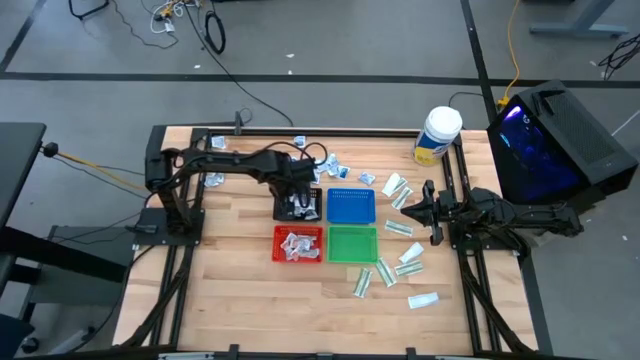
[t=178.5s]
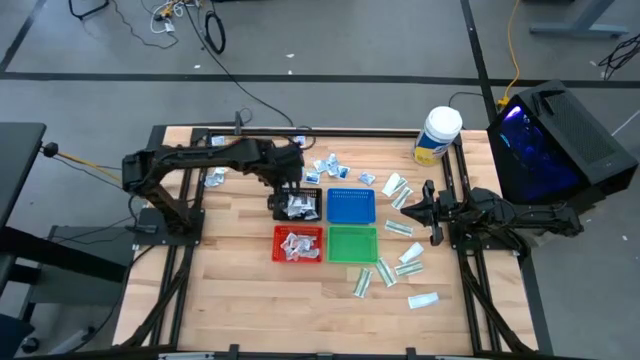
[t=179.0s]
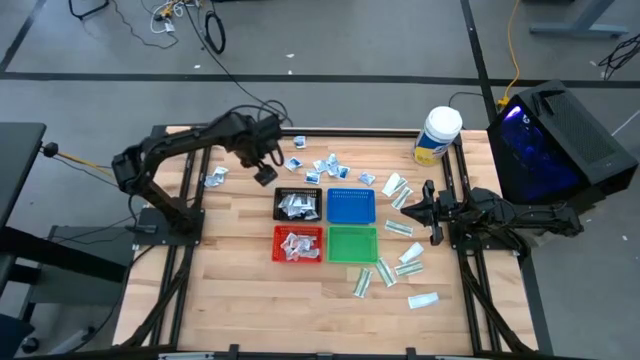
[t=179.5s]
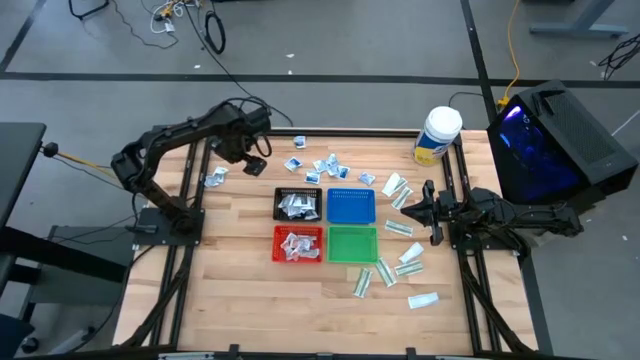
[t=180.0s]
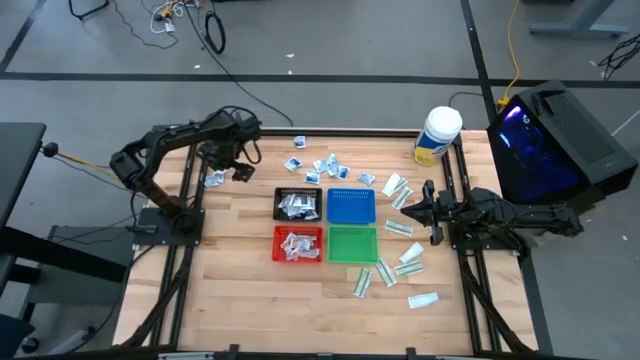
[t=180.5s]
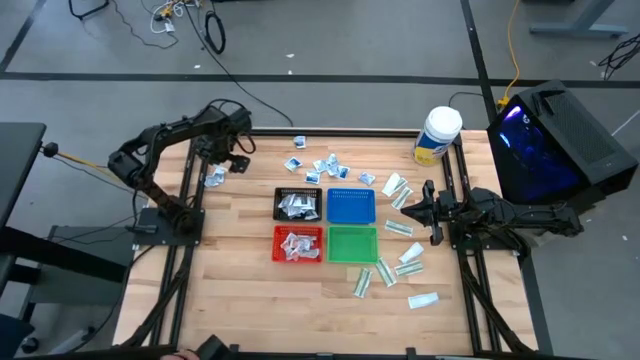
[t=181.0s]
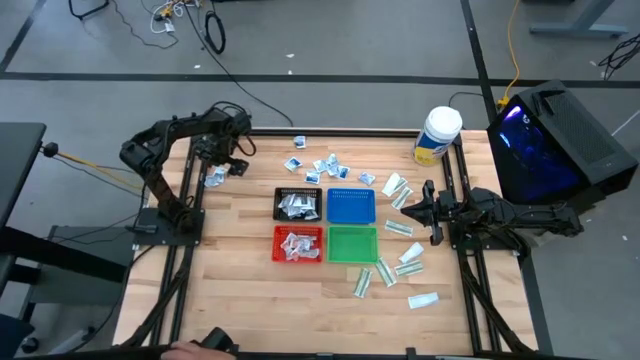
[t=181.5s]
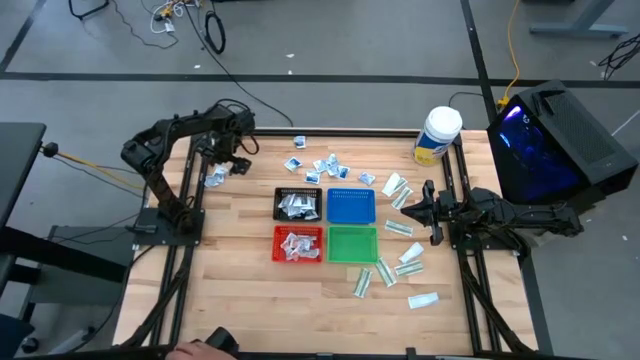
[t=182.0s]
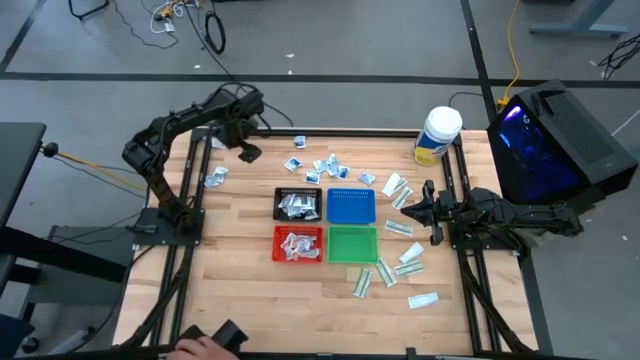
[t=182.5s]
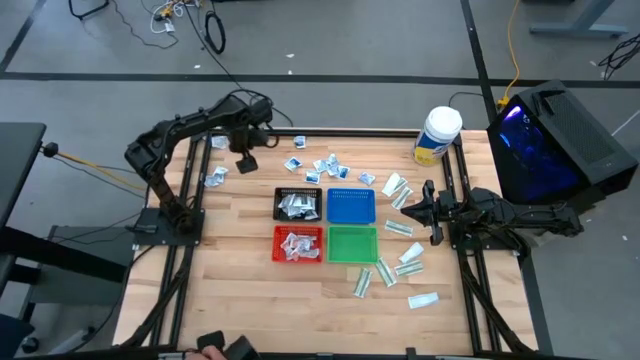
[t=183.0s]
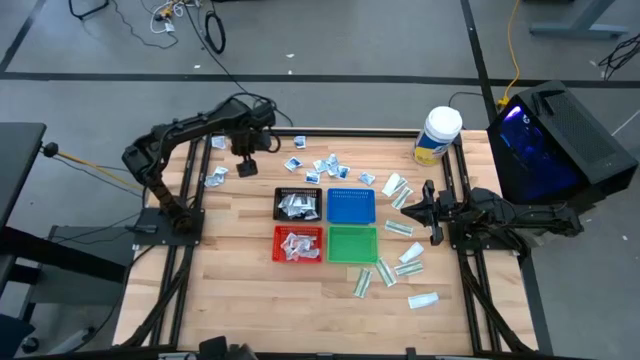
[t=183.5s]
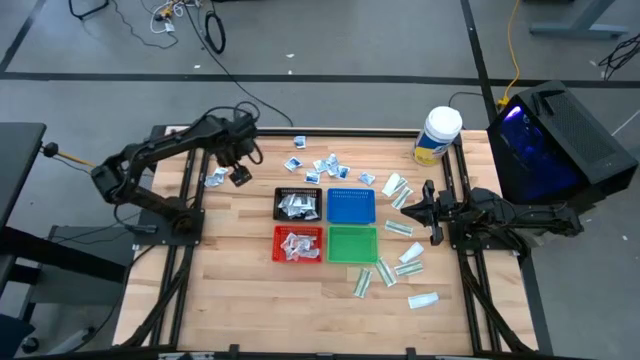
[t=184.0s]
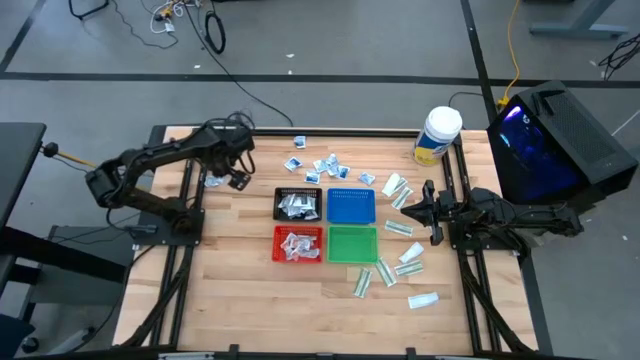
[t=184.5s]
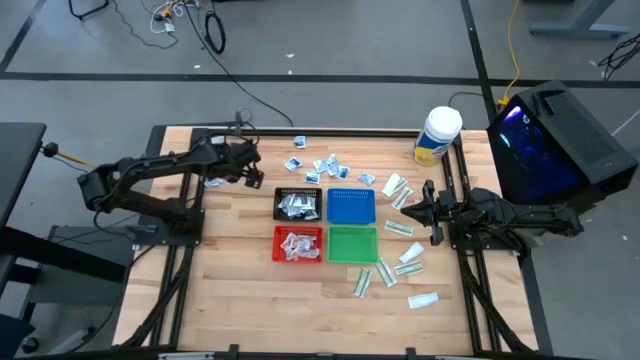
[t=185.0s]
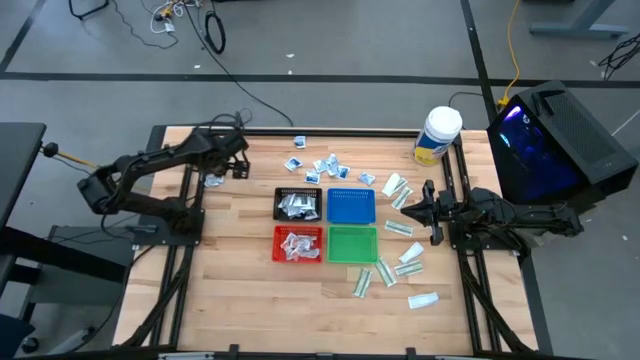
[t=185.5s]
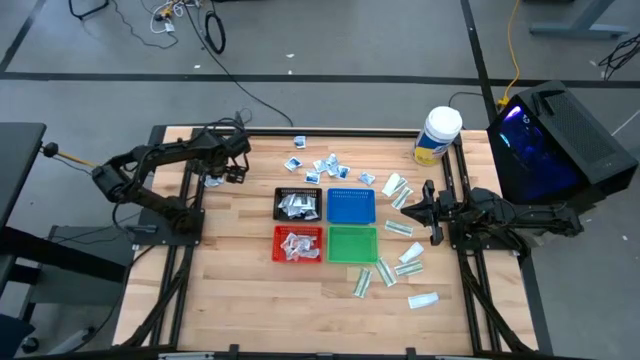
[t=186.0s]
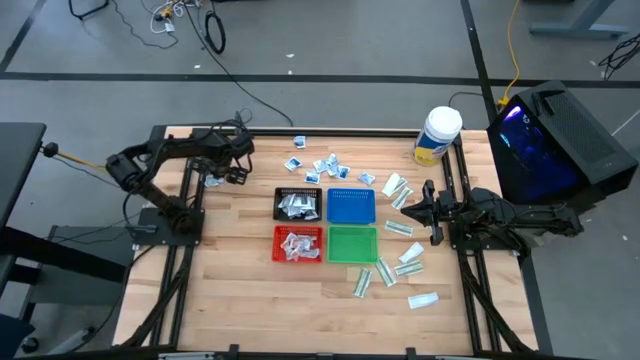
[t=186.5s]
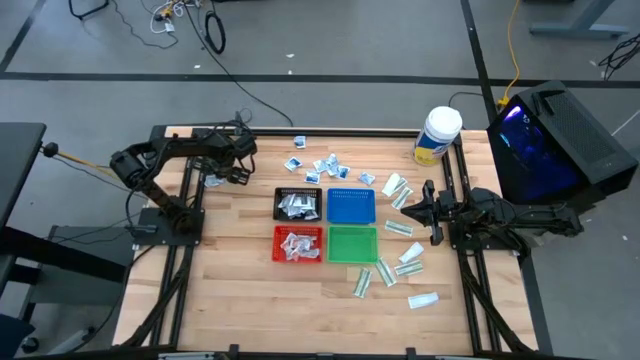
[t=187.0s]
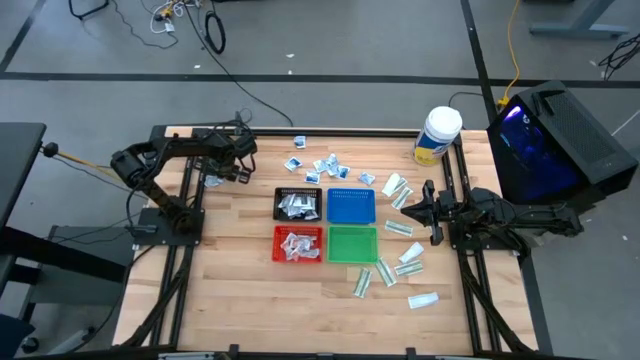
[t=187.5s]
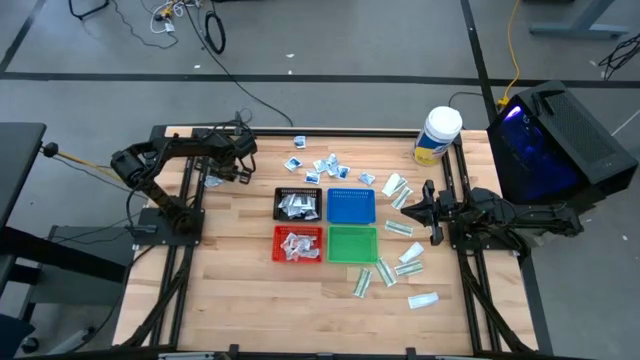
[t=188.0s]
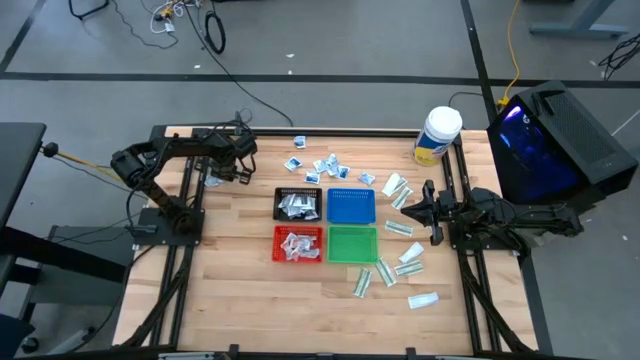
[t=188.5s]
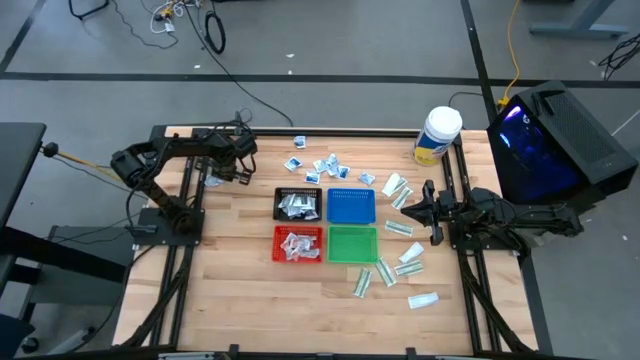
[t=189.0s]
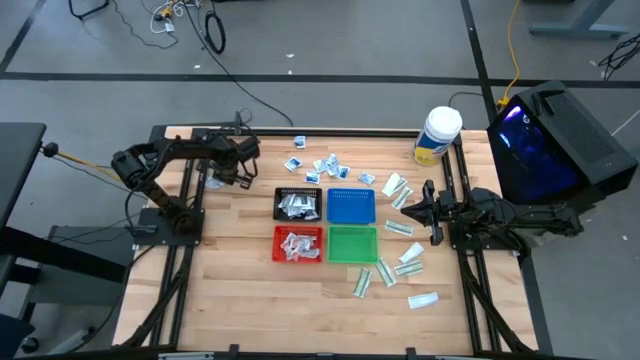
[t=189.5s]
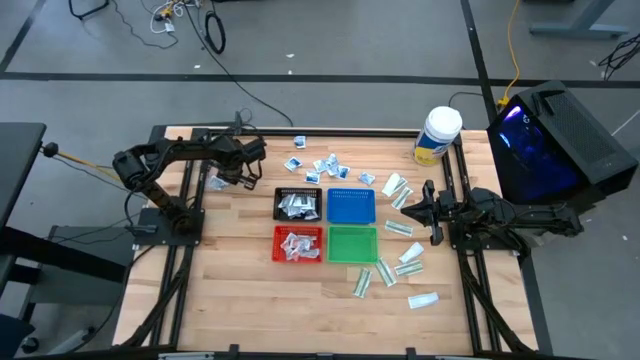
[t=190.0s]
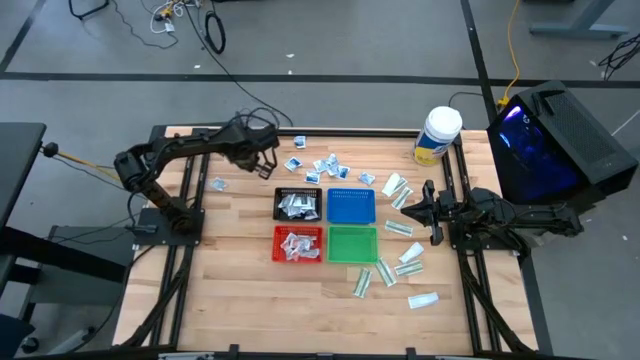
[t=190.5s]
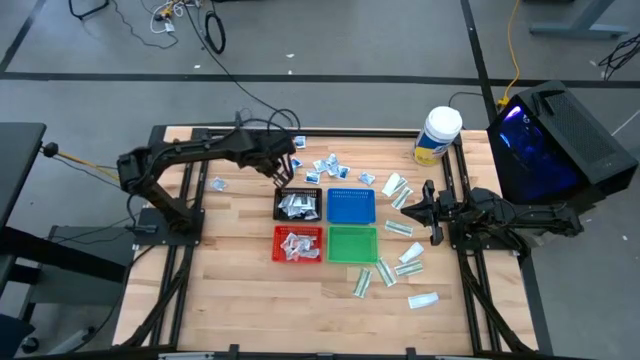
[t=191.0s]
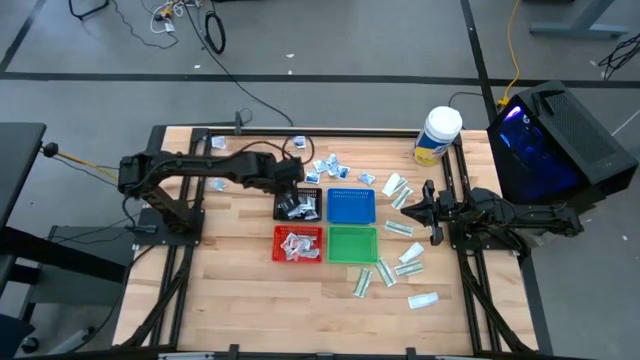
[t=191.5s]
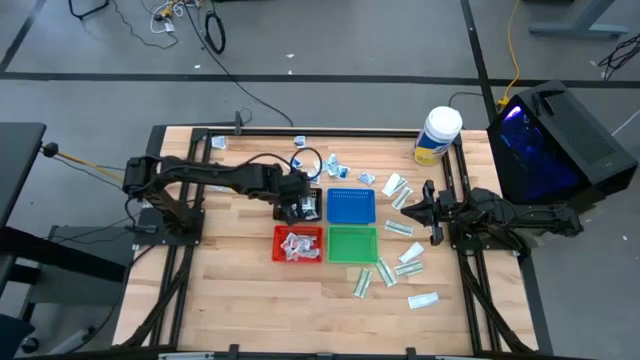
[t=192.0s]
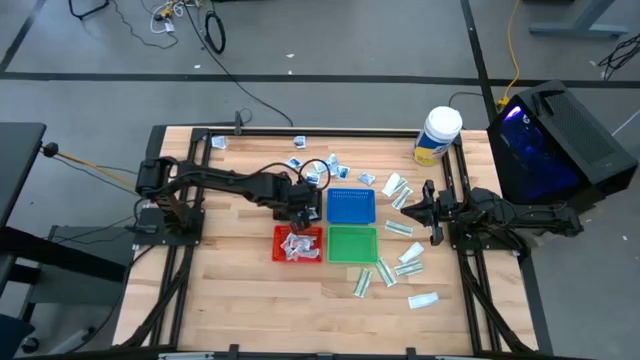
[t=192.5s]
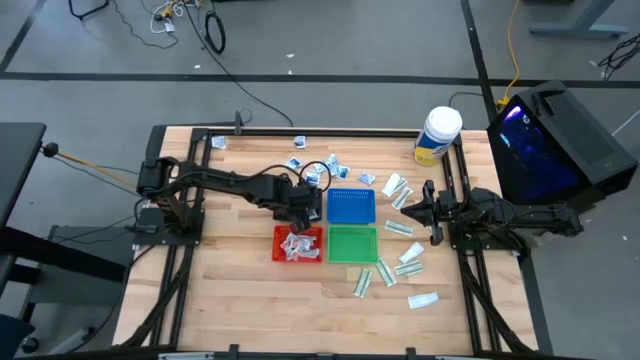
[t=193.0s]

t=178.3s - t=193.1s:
Task: Pick & Place First Aid Supplies
Put the gray towelette pack into the black bin

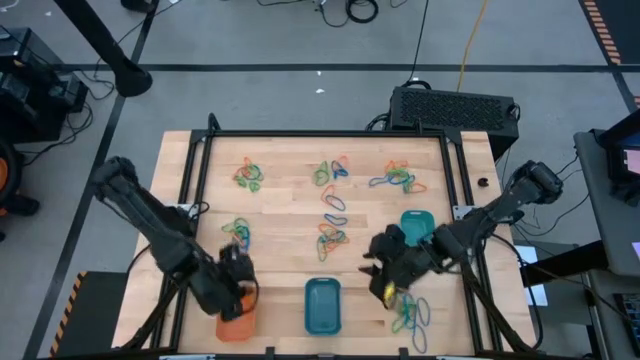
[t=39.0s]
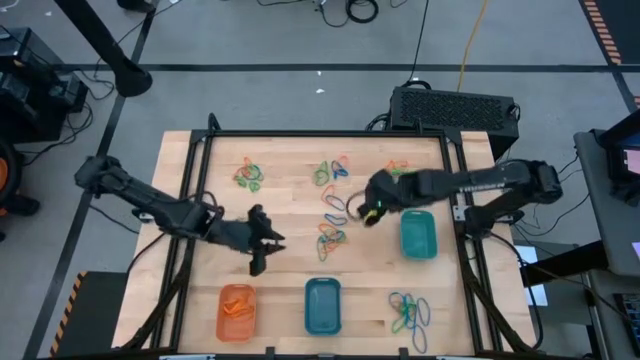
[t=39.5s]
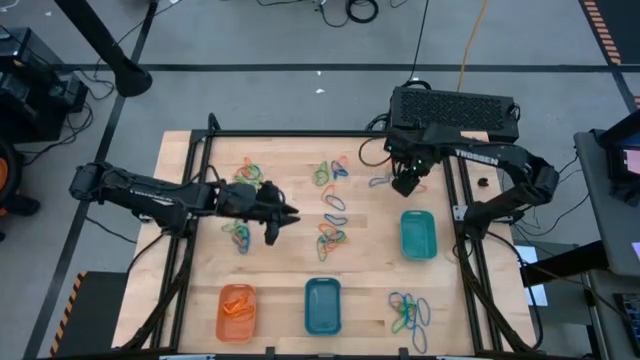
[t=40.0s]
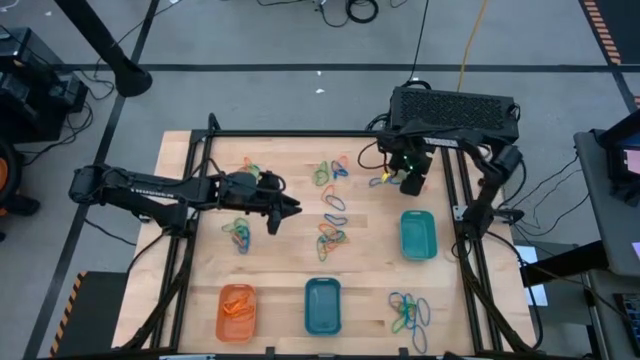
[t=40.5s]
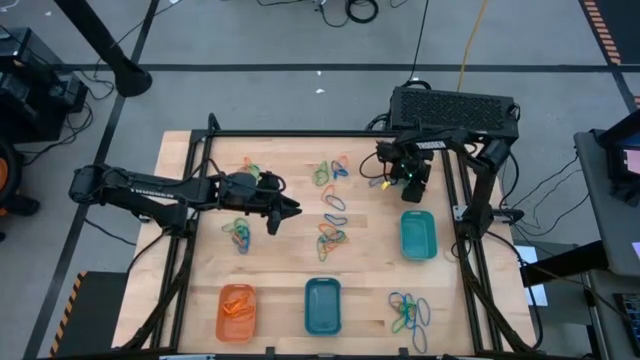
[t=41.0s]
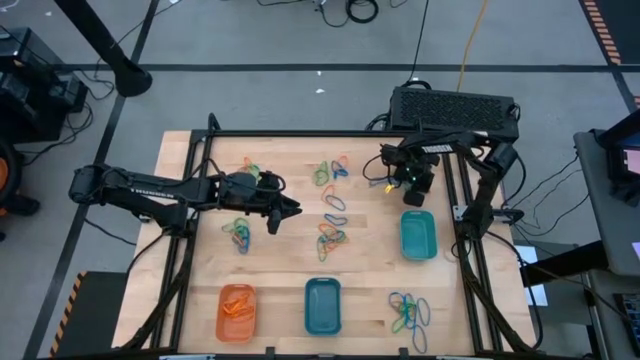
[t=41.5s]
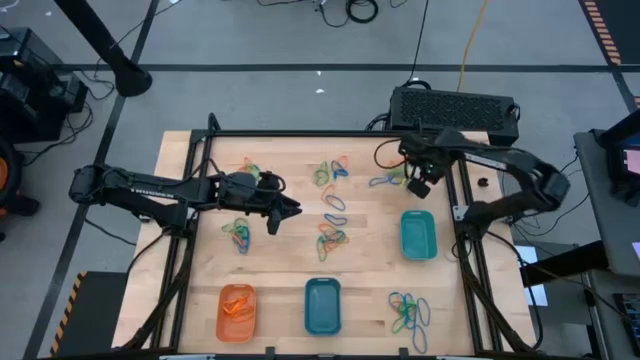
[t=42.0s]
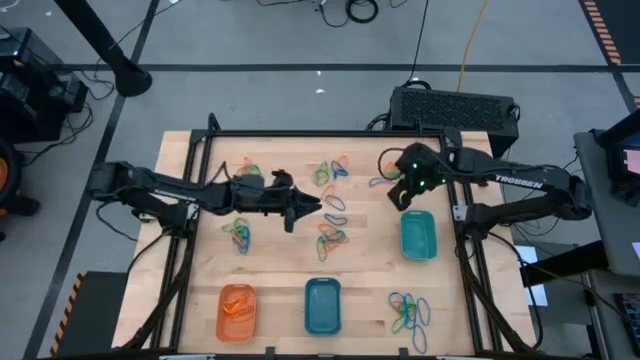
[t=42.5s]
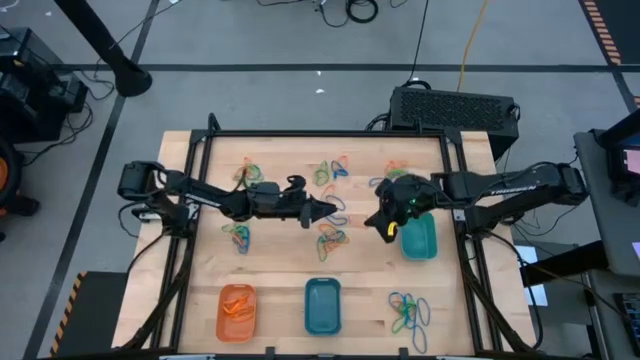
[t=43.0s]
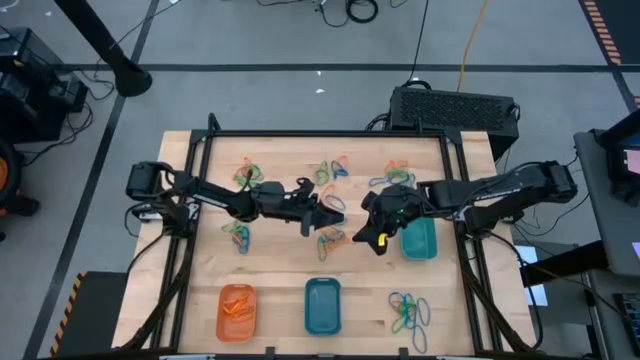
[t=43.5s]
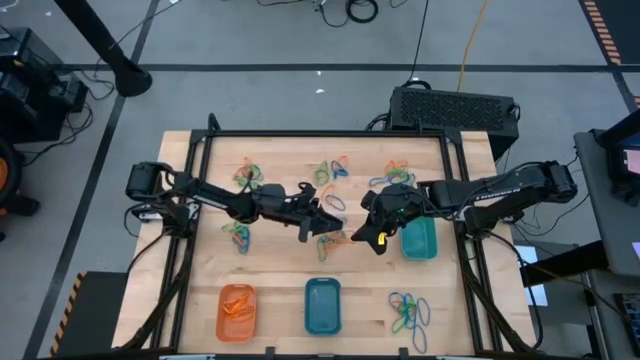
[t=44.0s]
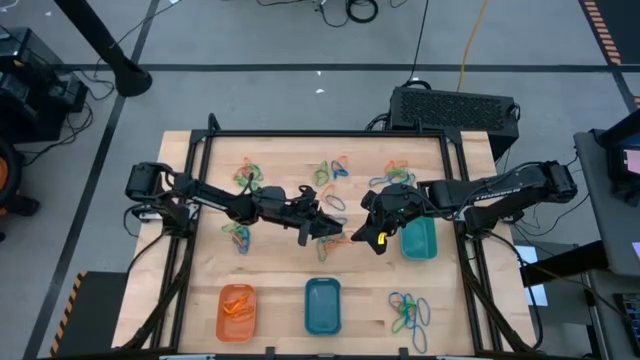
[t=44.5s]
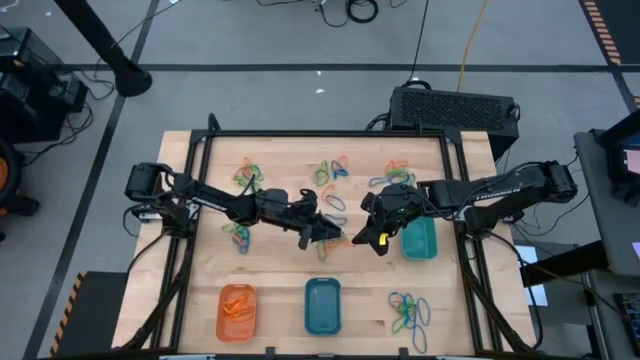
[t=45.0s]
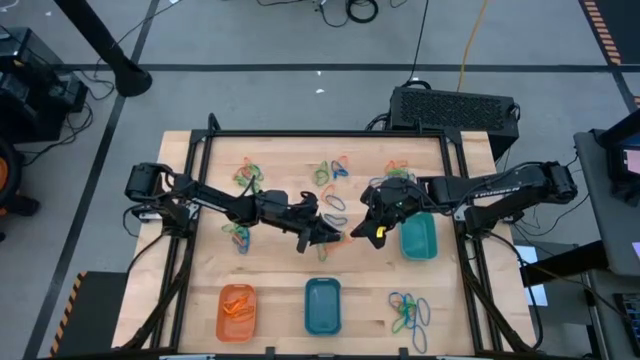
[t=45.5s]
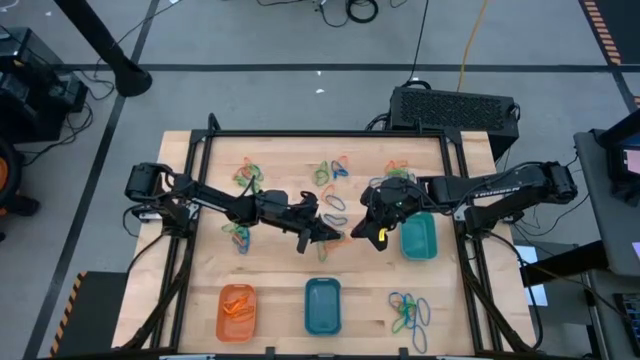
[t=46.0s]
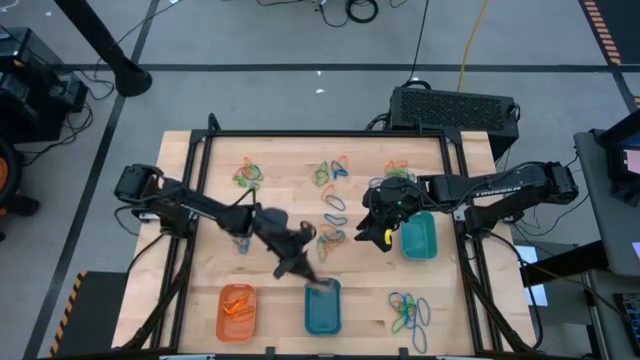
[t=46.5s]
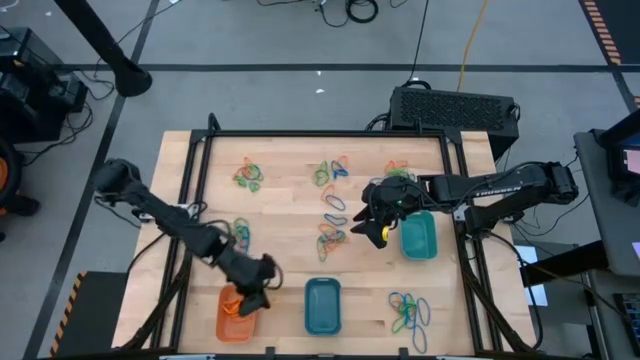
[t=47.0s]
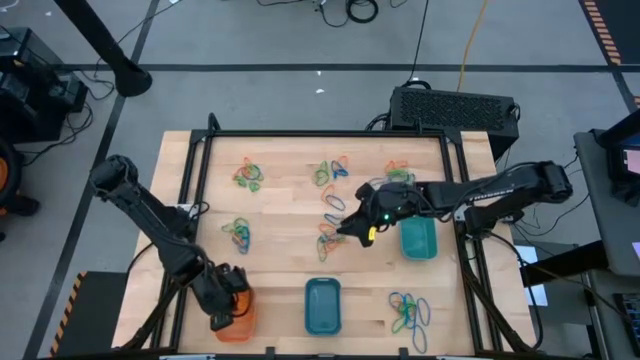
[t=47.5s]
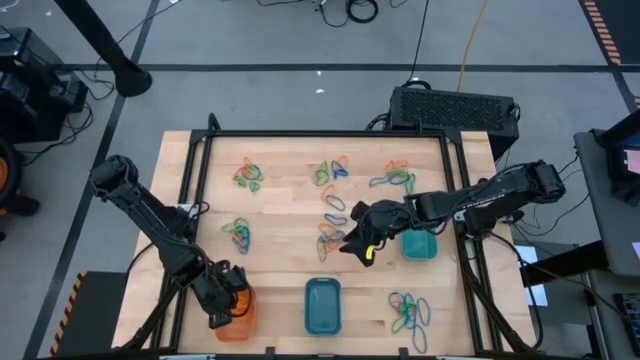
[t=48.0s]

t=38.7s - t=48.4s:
Task: Sort rubber bands into baskets
Put the orange rubber band into the orange bin
